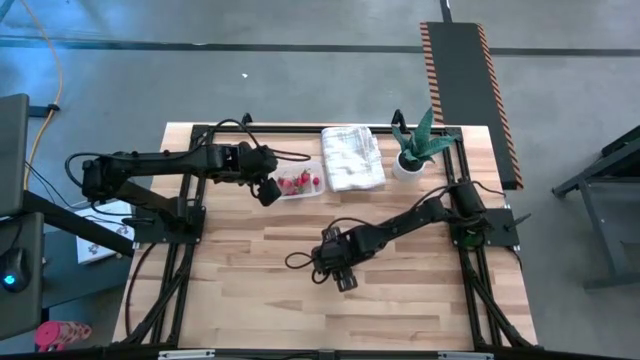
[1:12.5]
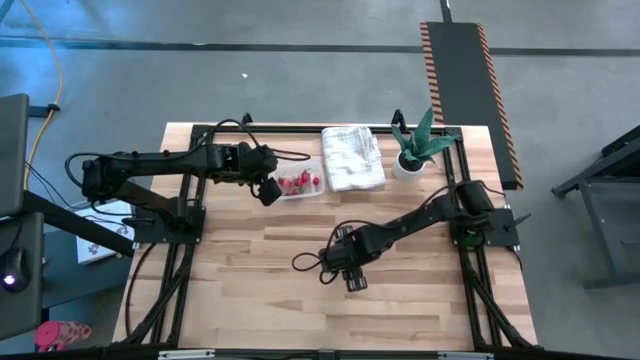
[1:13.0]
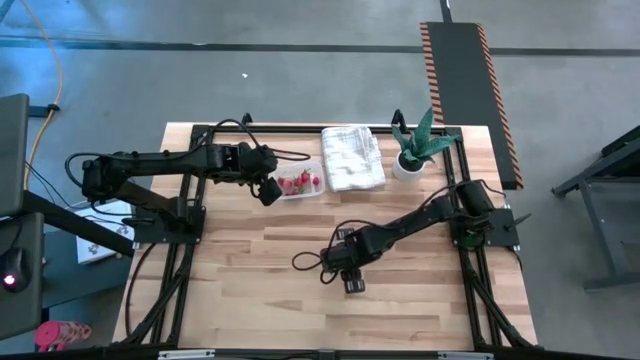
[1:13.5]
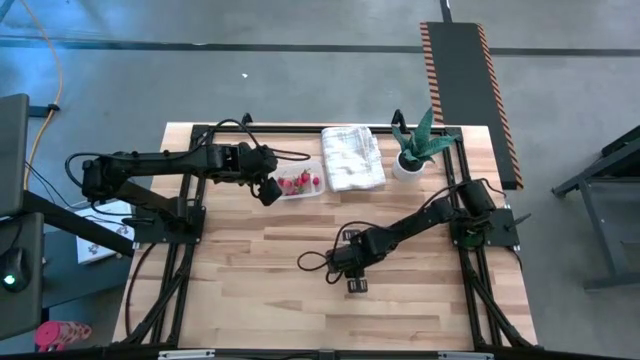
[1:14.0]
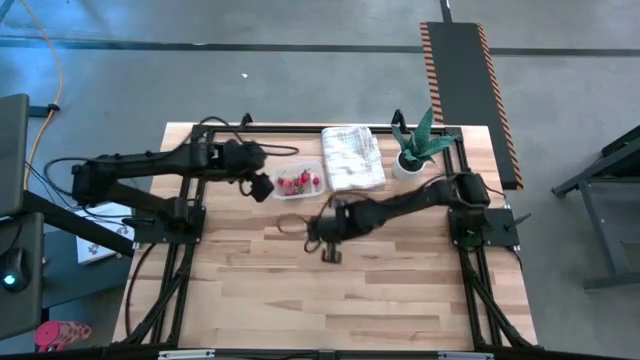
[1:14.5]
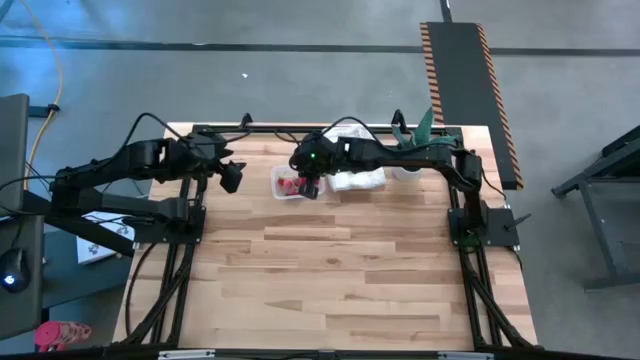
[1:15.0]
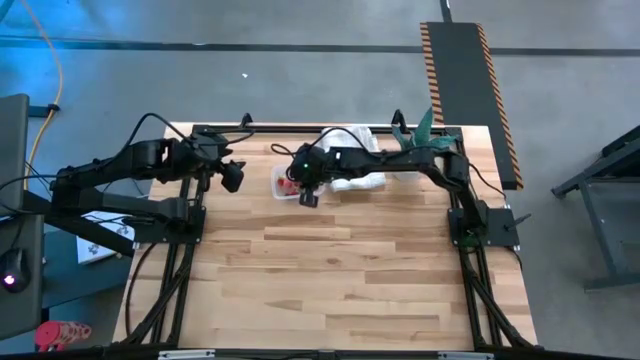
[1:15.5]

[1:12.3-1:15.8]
Task: Pick and placing Produce into tupperware
Put the black cherry into the transparent bin

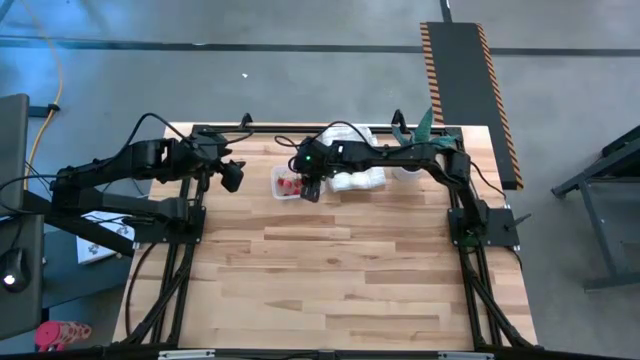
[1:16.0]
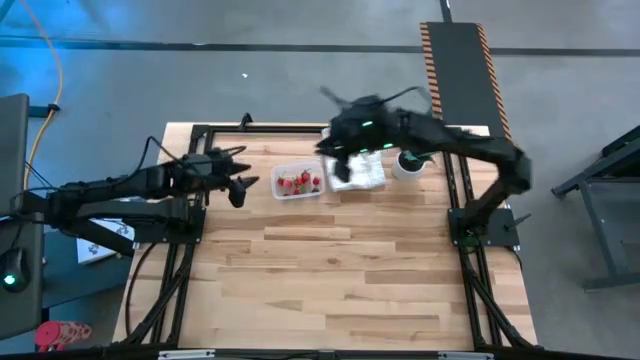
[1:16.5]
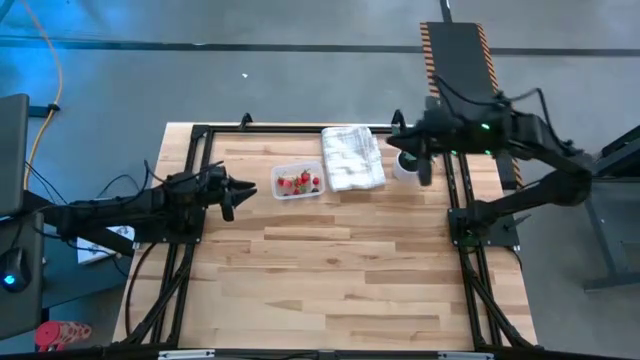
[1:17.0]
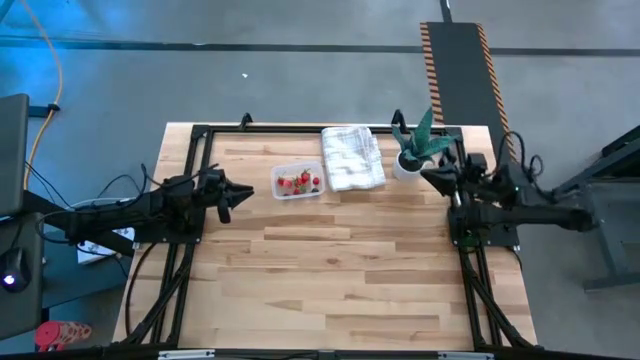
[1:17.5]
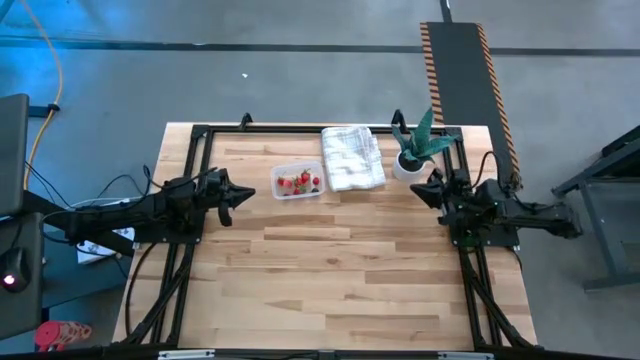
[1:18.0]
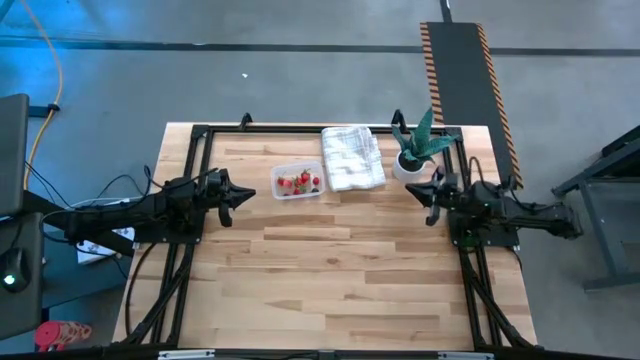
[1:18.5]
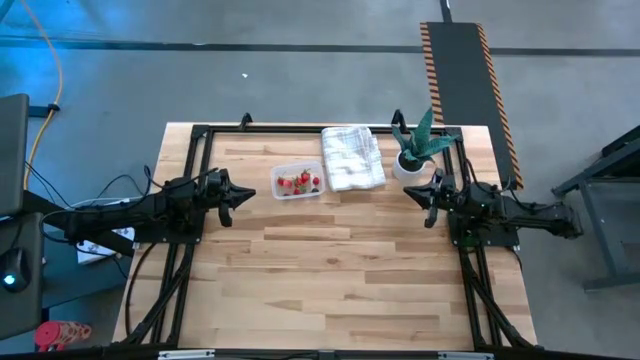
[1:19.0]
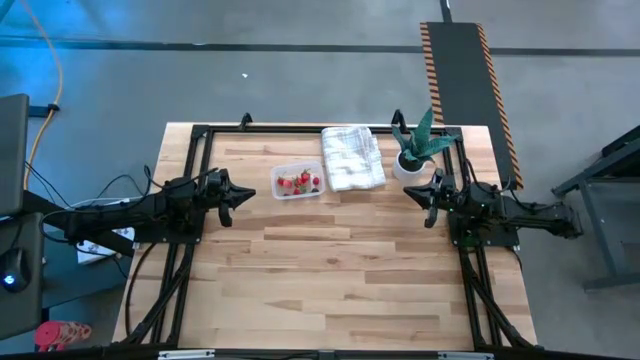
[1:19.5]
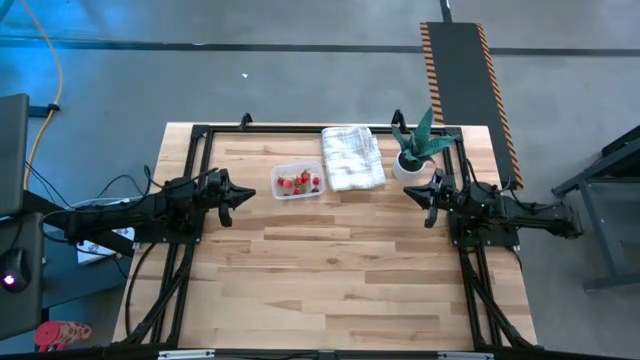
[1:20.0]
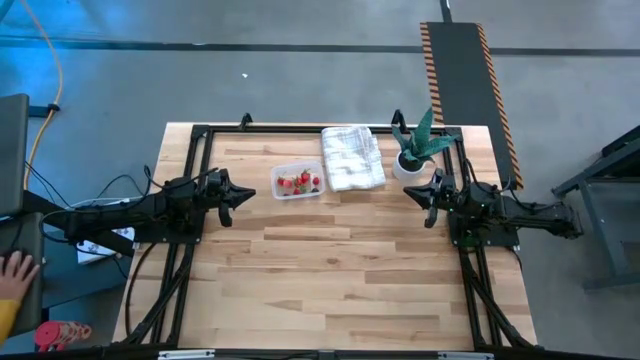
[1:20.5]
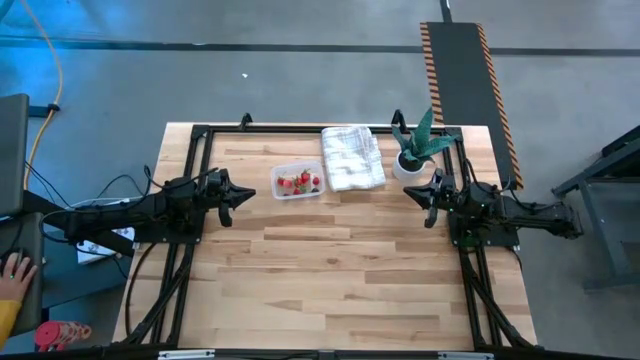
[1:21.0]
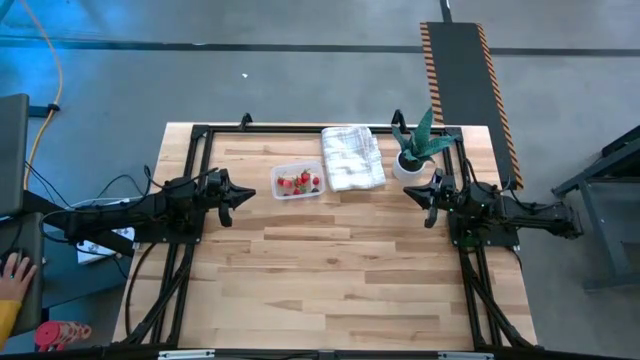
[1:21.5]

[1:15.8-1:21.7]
Return to Home Position

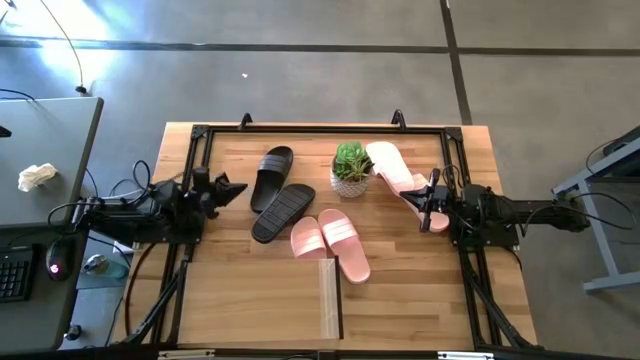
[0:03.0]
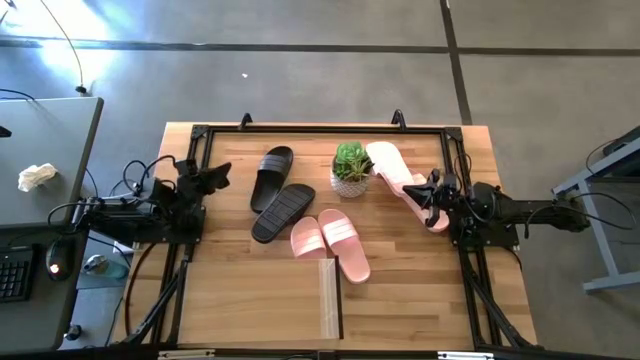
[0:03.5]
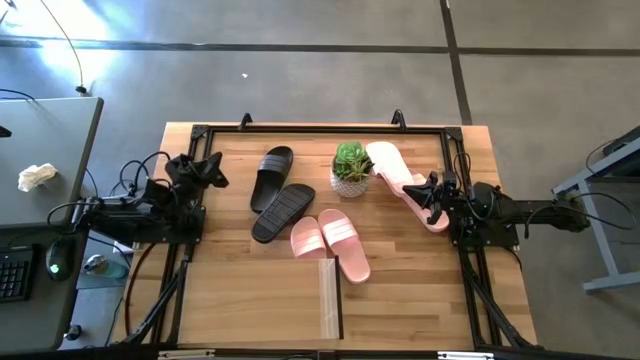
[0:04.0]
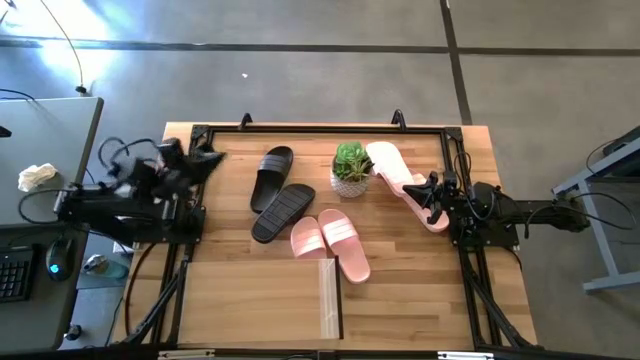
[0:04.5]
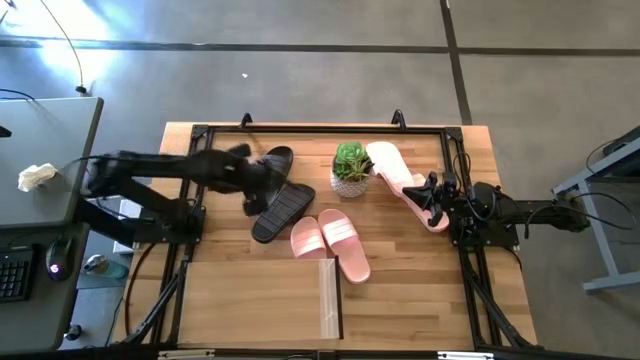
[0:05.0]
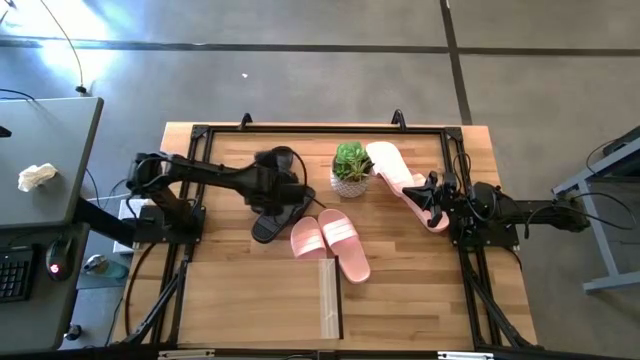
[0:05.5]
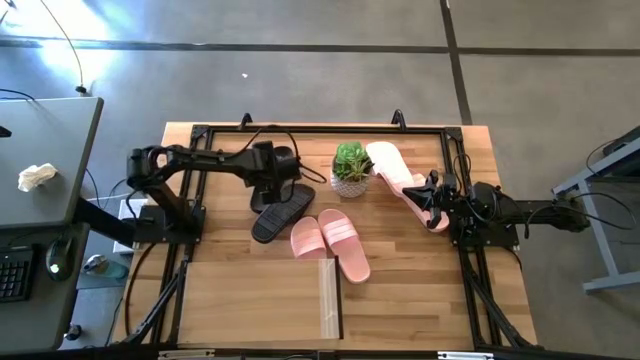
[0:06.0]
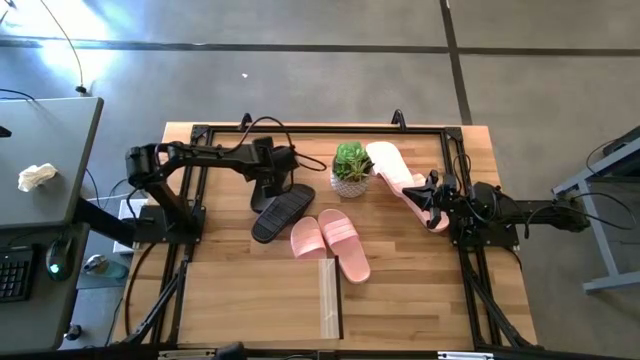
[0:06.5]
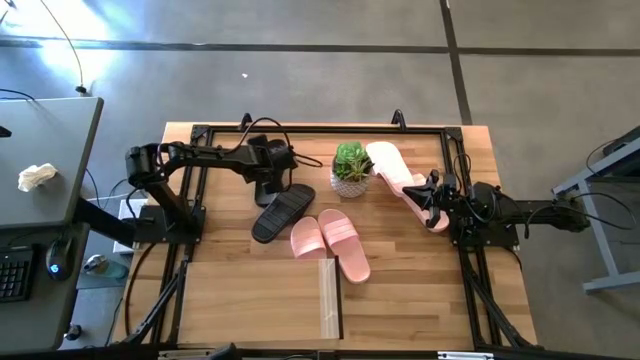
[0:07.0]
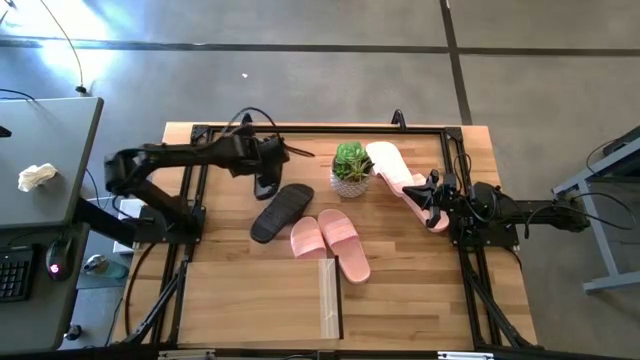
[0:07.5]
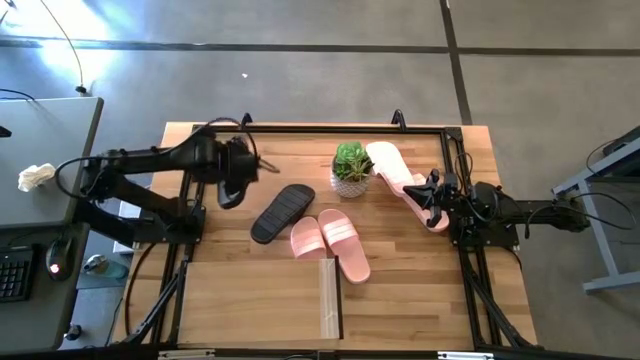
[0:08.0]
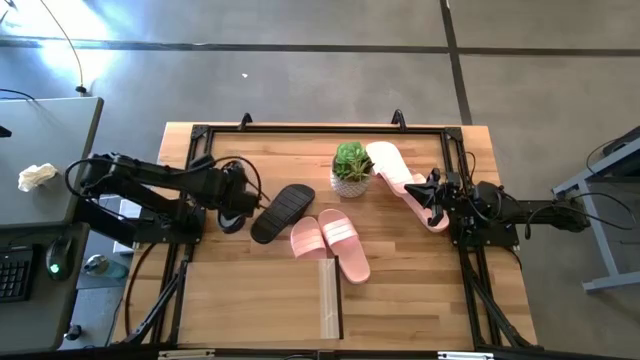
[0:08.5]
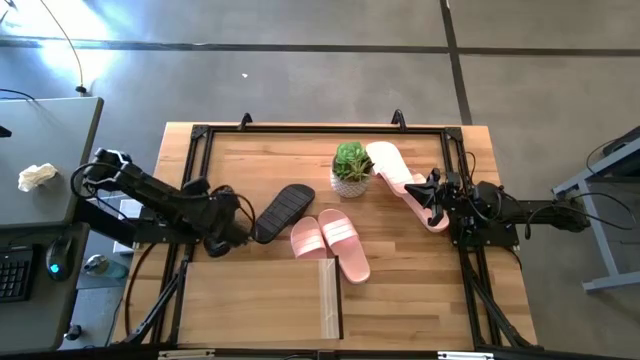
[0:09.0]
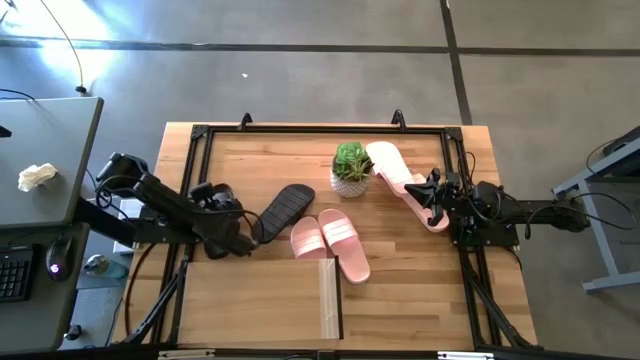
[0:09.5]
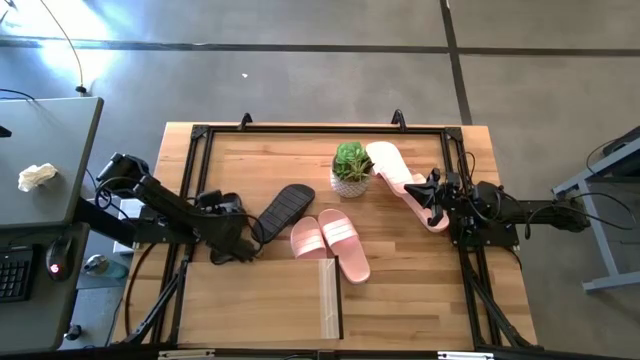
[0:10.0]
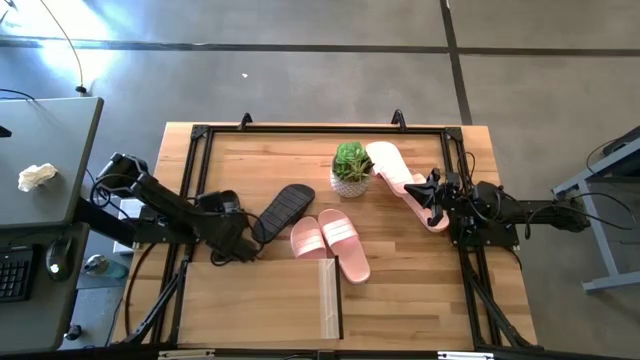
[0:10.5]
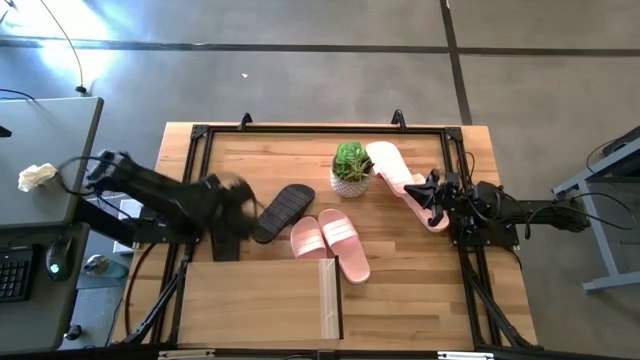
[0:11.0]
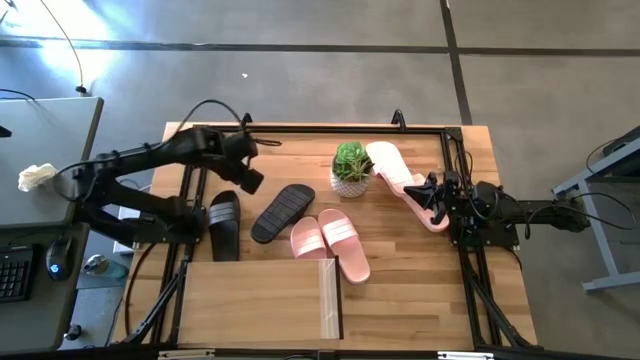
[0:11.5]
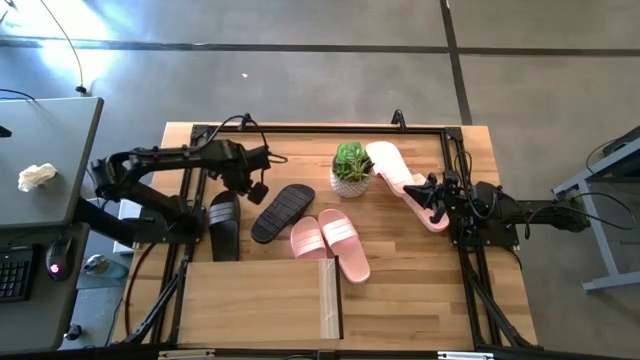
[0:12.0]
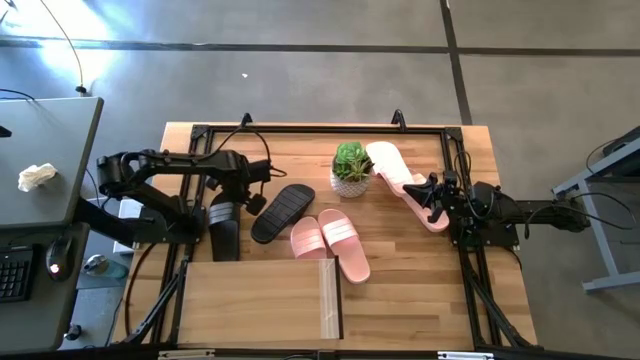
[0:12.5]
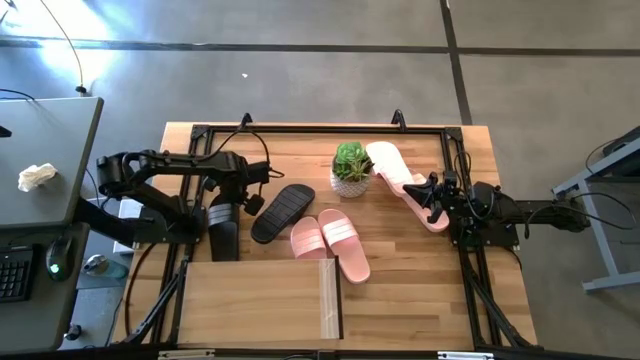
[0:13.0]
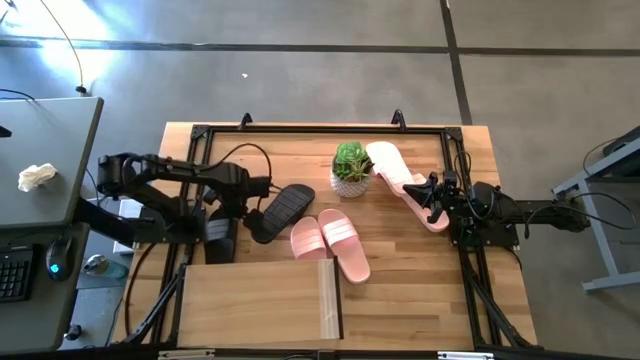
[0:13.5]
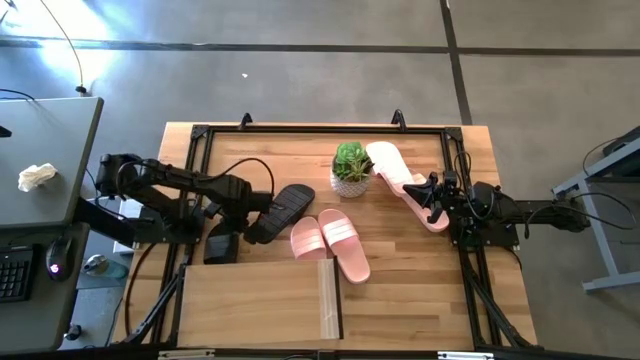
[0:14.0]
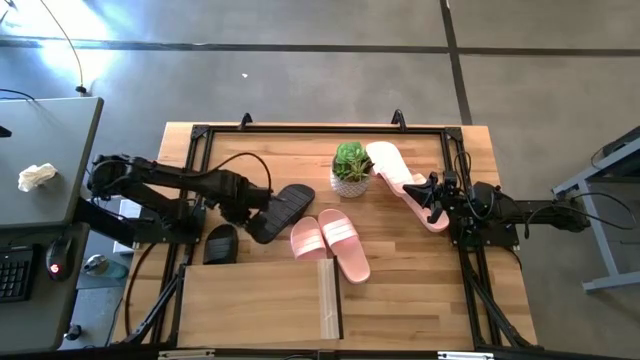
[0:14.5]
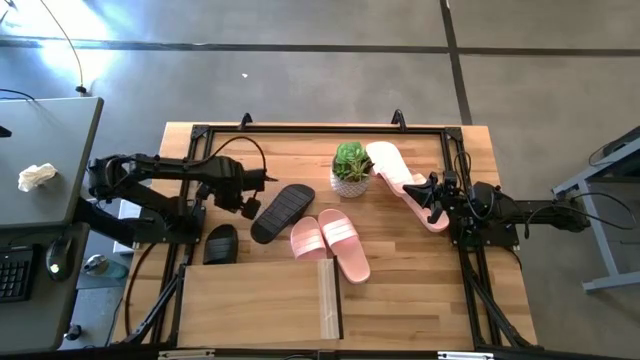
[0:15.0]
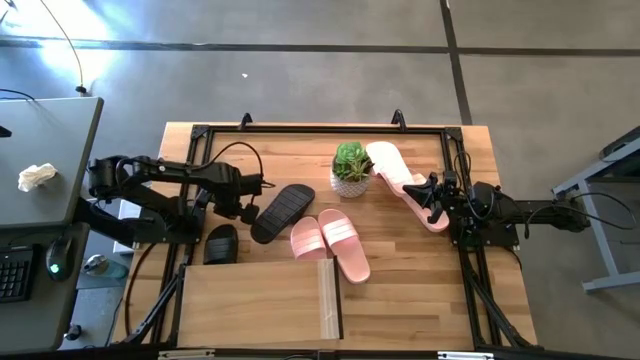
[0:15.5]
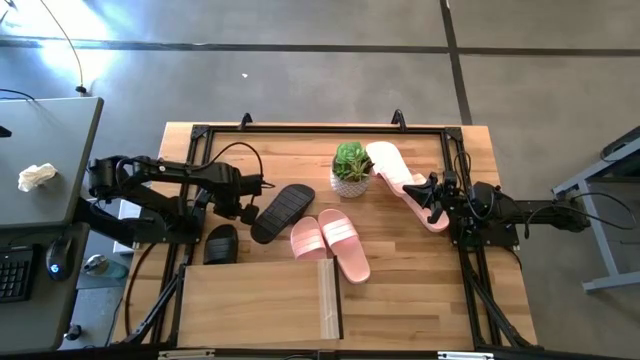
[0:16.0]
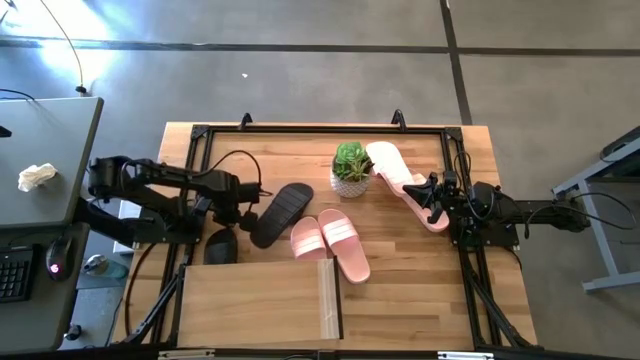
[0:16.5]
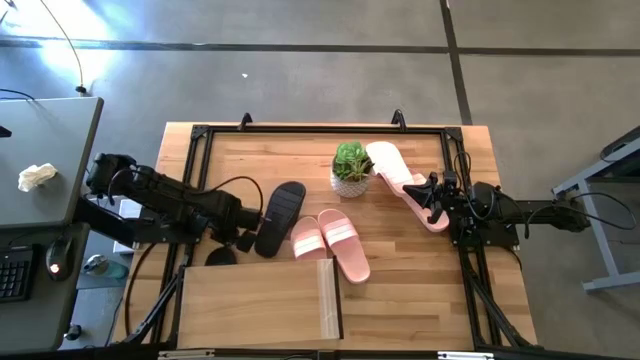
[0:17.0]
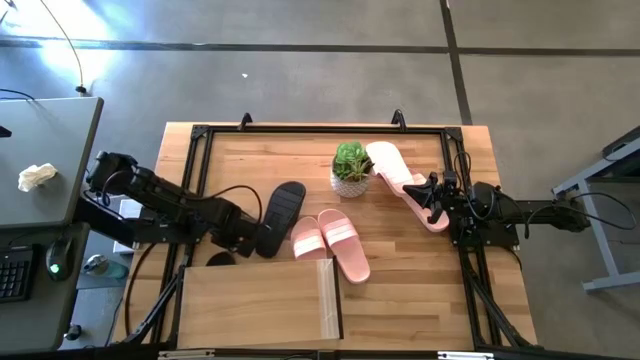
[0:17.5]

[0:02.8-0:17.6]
Task: Pick and place slides into the shelf
Put the black slide under the shelf
